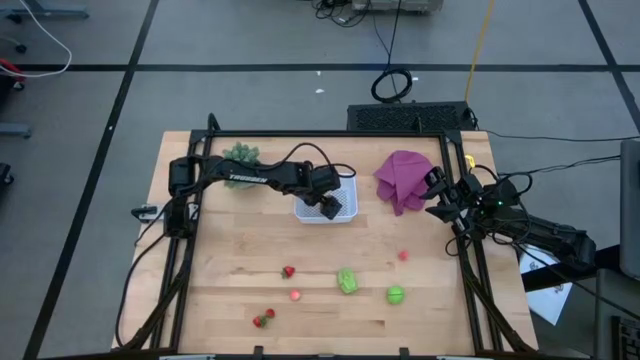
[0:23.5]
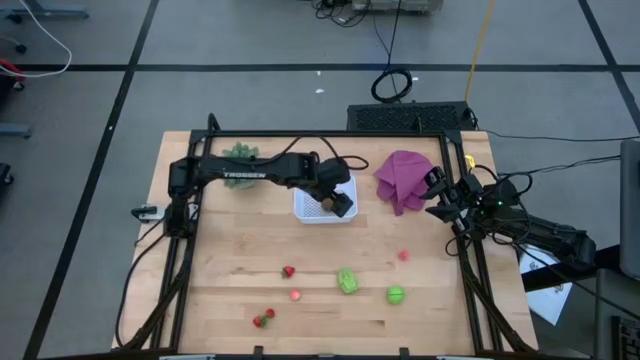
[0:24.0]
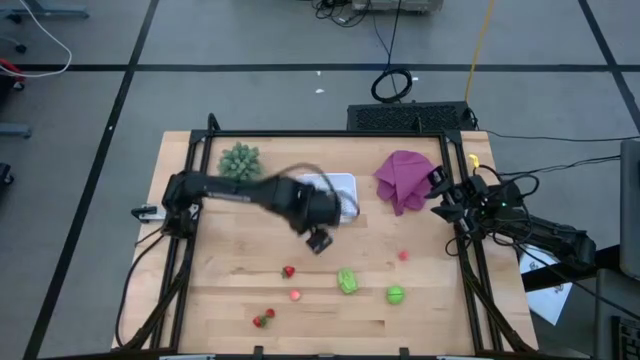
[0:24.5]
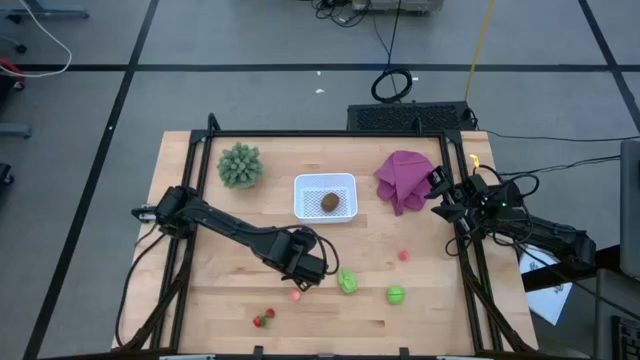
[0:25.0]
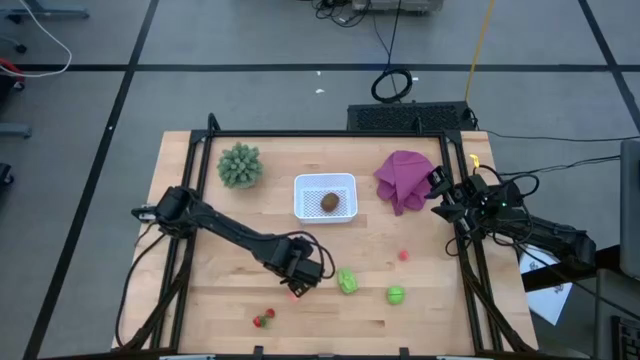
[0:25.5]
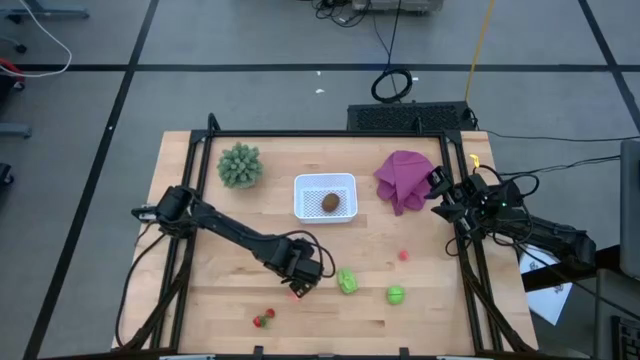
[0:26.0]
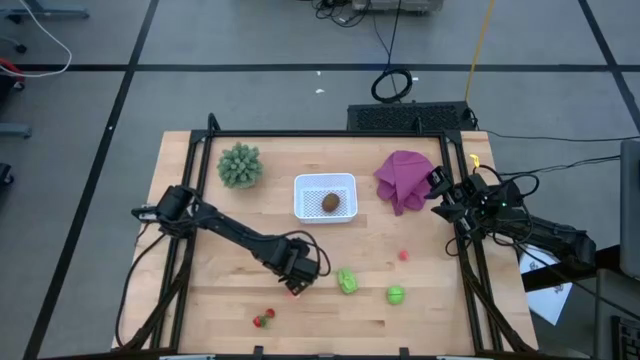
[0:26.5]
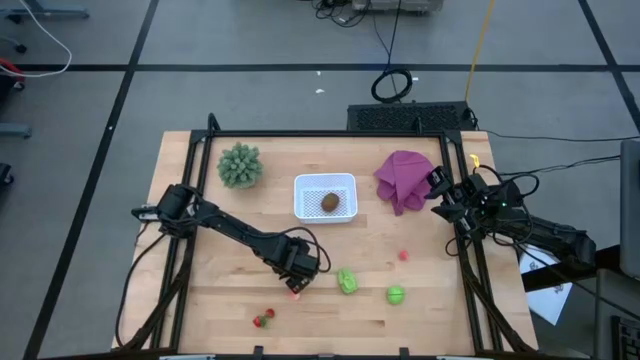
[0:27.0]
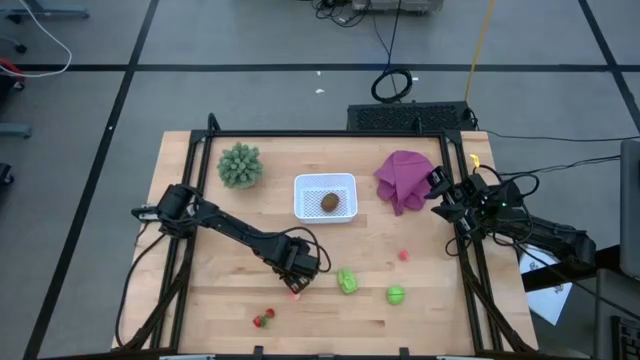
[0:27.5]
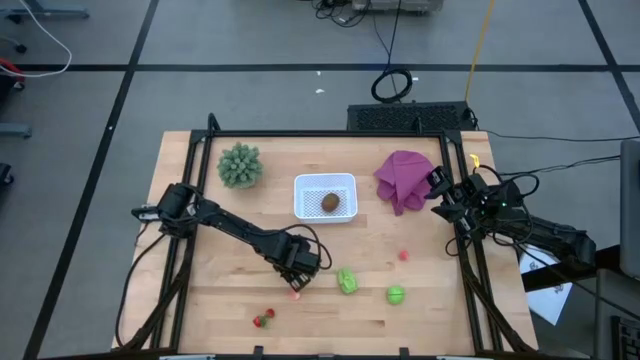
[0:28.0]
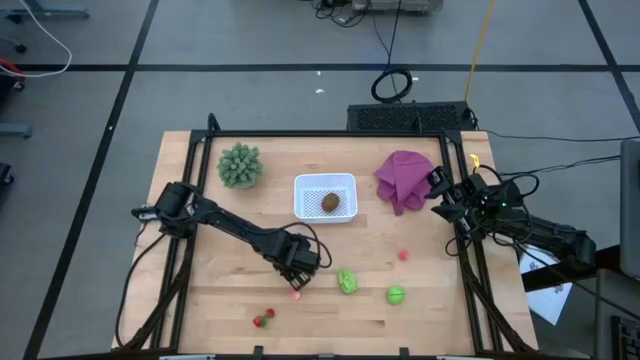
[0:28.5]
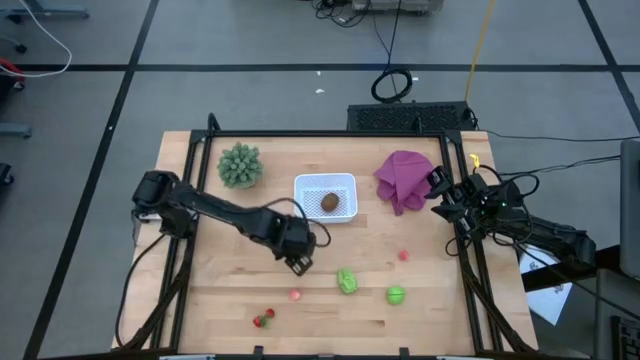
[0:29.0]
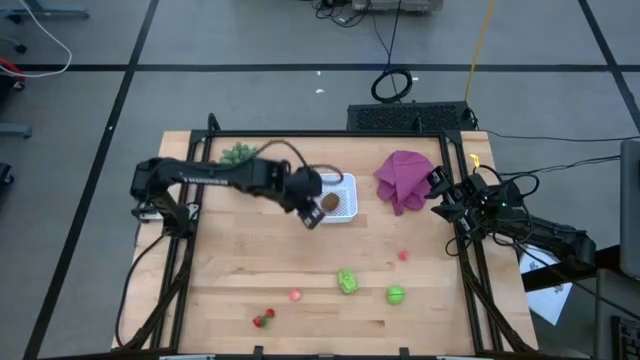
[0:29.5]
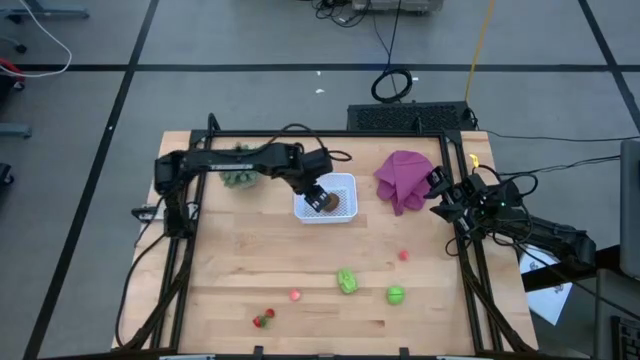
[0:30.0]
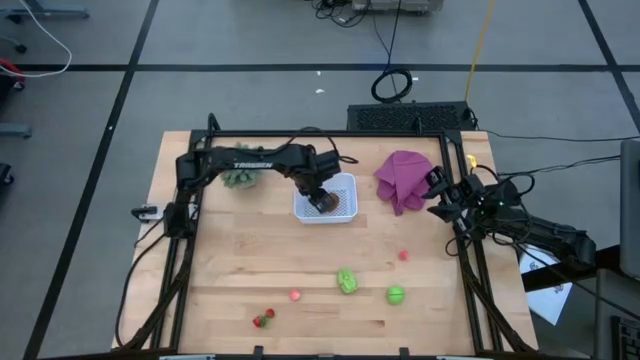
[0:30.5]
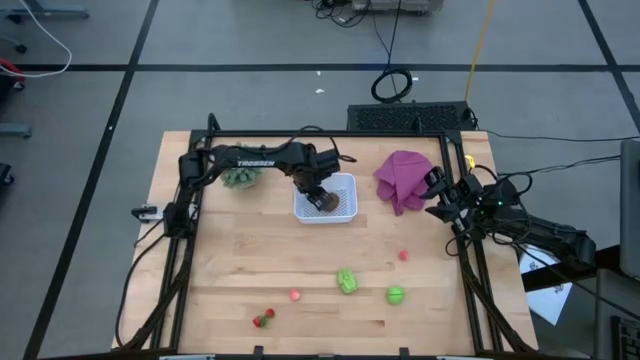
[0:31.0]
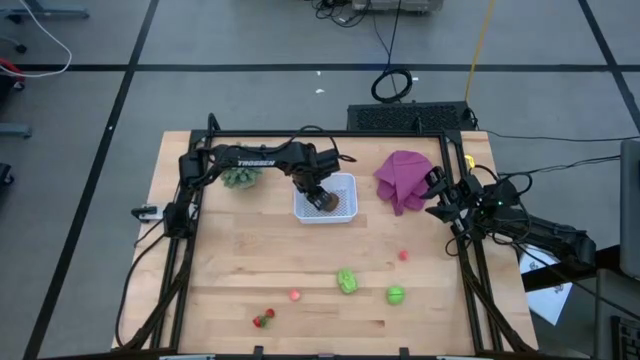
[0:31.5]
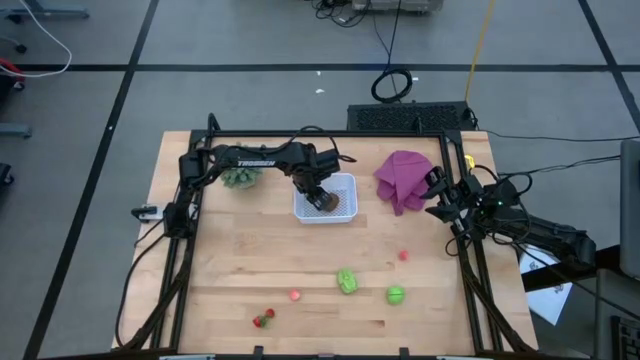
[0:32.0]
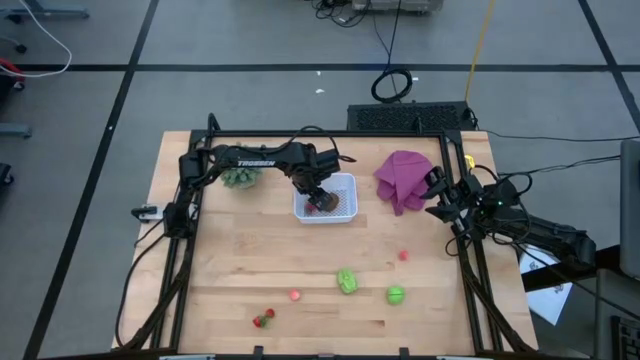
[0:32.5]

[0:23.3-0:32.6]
Task: Pick and placing Produce into tupperware
Put the top red strawberry into the white bin

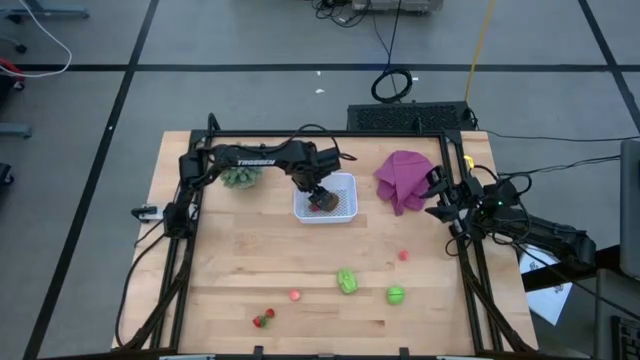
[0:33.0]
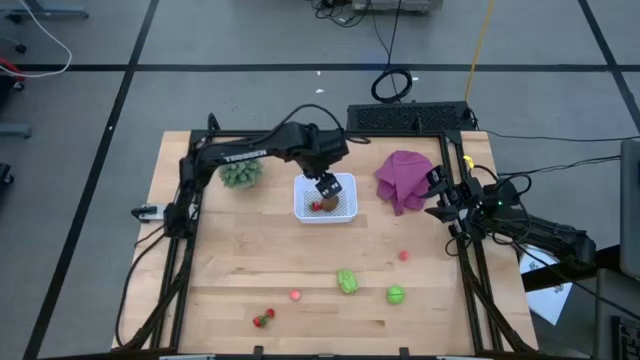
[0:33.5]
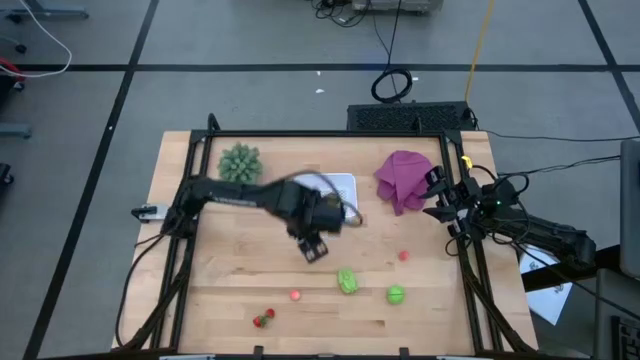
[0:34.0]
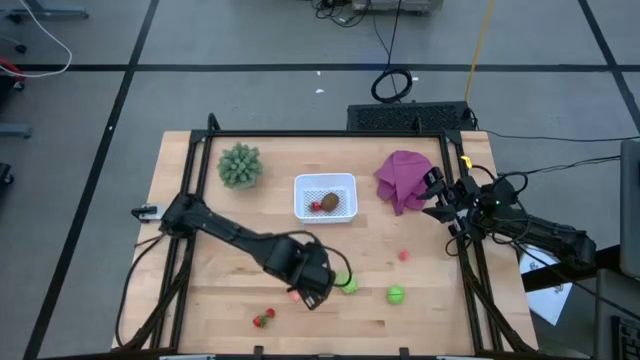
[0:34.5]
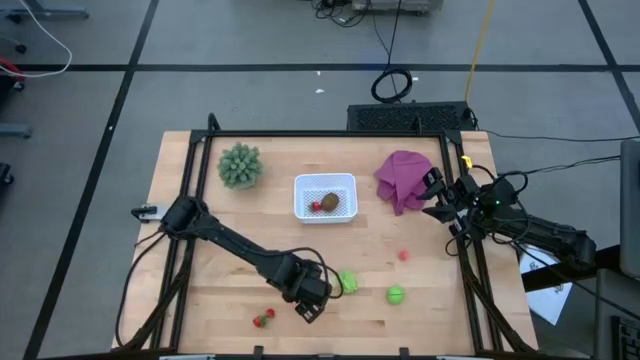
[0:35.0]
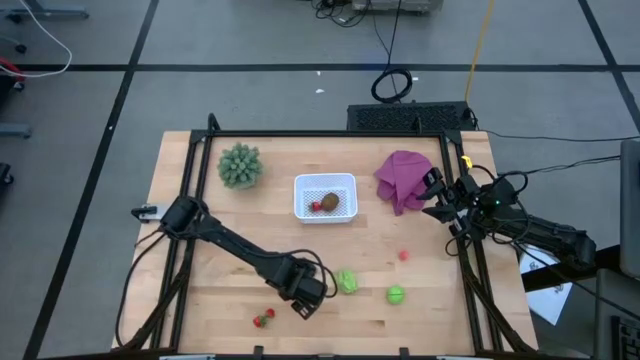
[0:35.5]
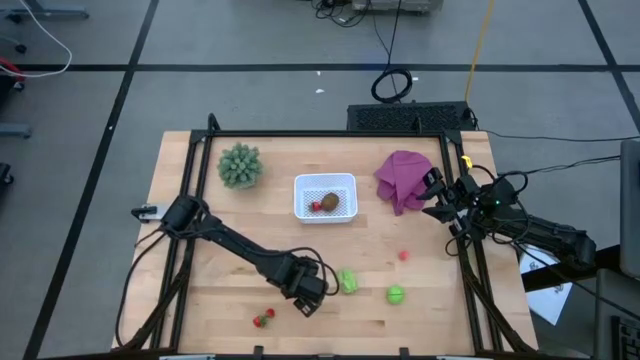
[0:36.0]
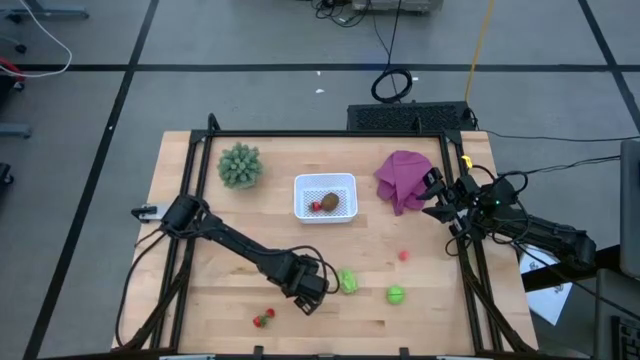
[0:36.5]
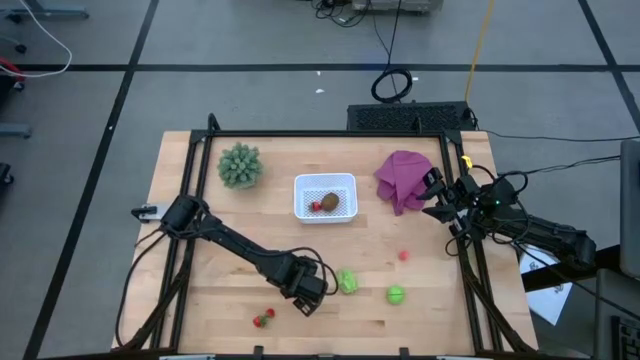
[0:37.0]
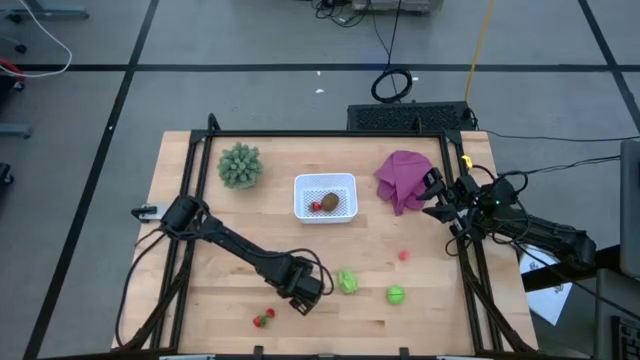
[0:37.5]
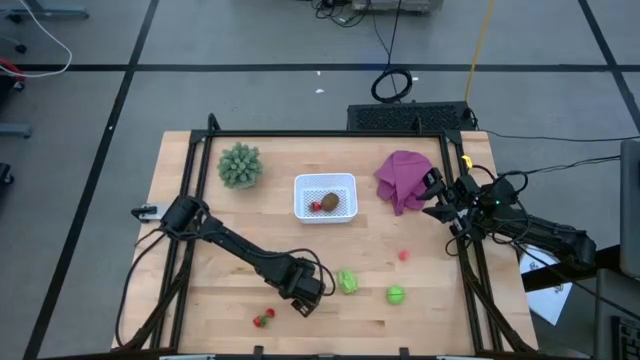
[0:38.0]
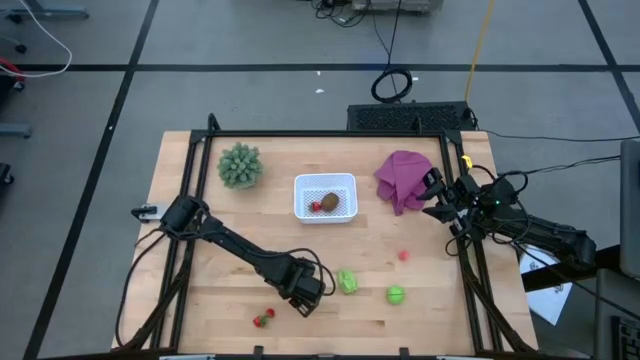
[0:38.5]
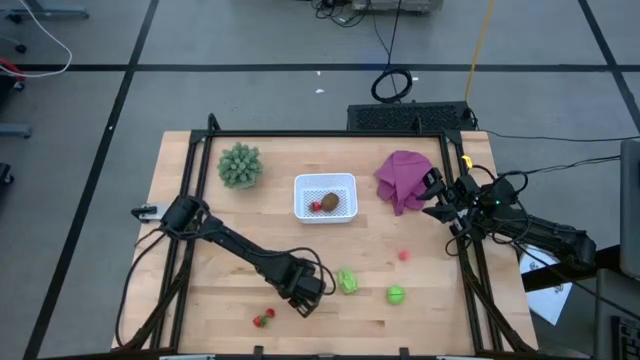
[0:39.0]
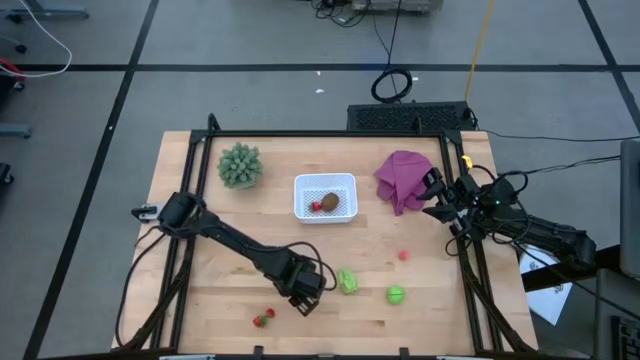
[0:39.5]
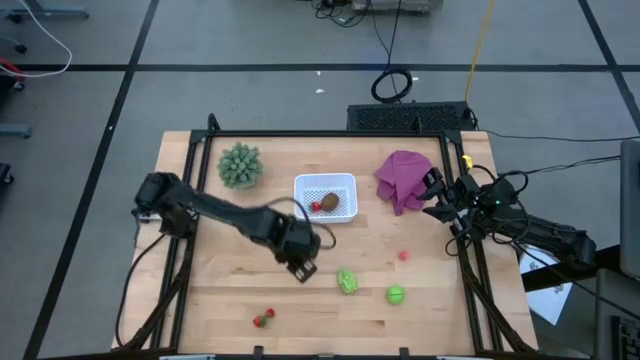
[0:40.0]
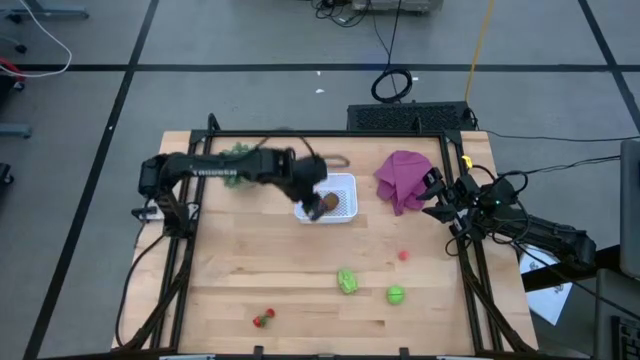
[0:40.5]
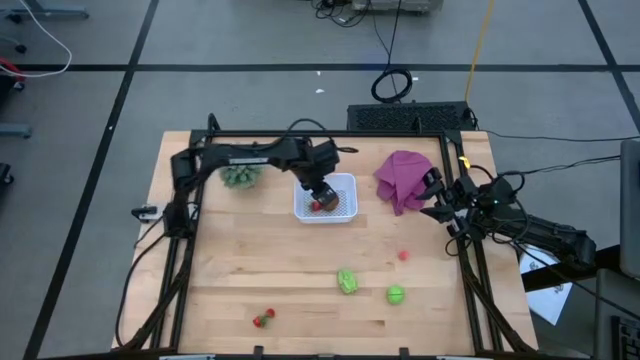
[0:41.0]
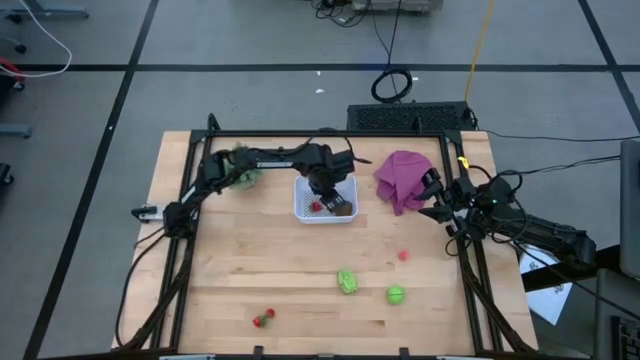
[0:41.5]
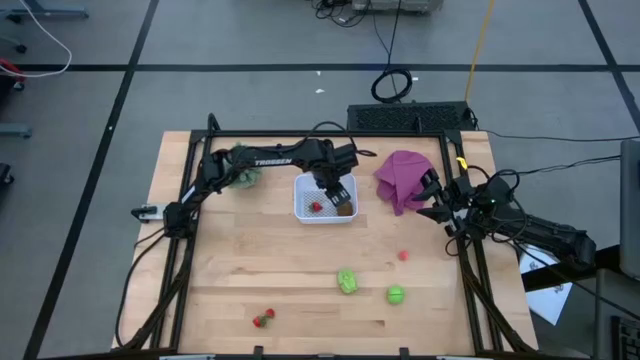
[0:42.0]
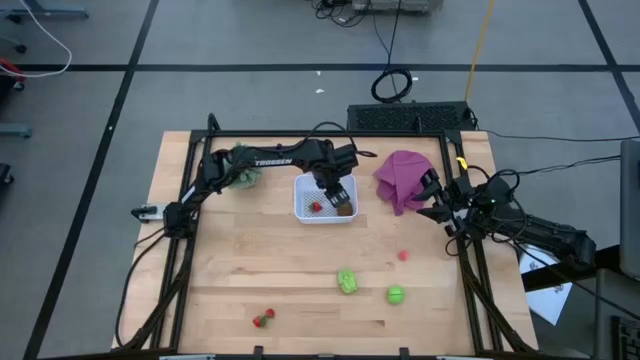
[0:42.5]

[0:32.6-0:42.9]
Put the left pink peach into the white bin

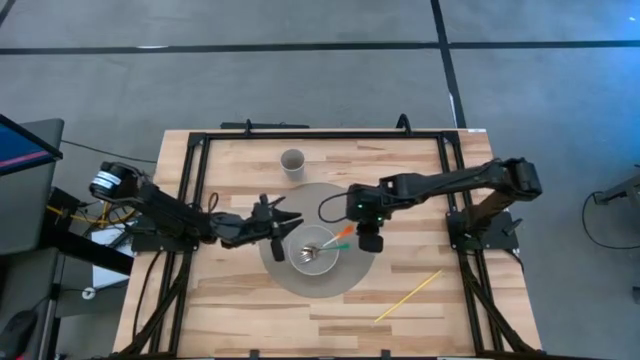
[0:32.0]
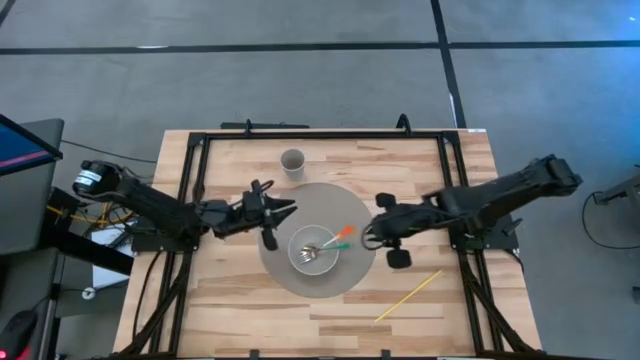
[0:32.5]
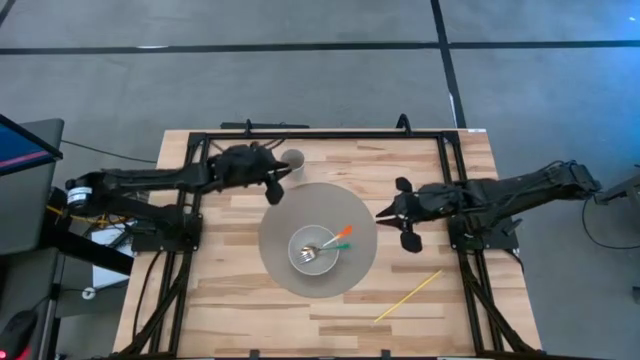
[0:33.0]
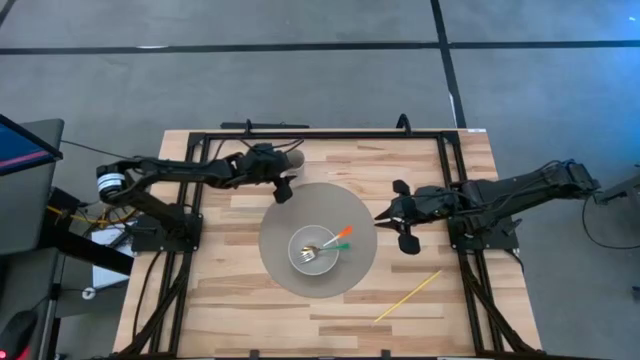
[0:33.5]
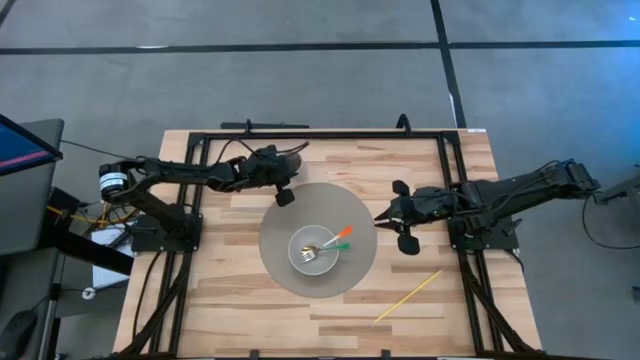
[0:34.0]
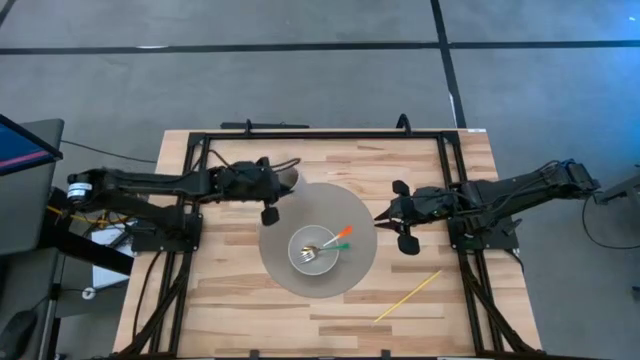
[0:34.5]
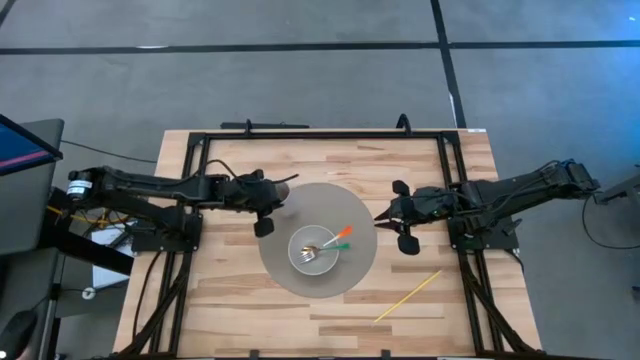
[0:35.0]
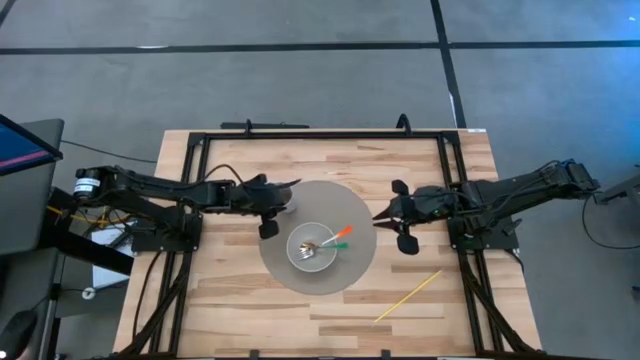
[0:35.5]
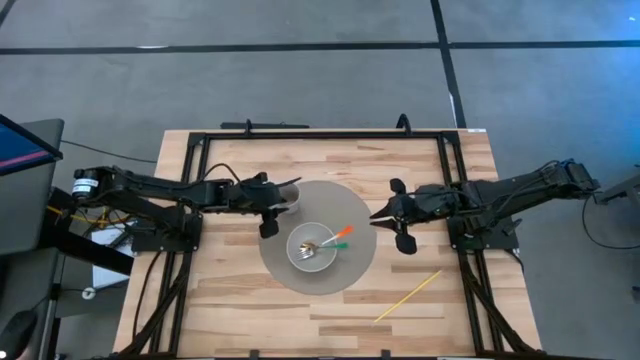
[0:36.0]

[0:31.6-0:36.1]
Task: Pick & Place Utensil
Put the gray cup on the gray placemat
